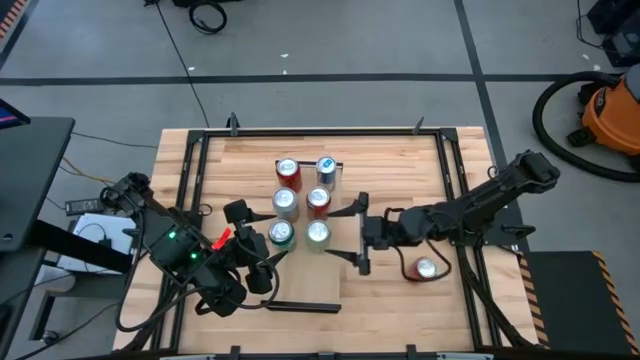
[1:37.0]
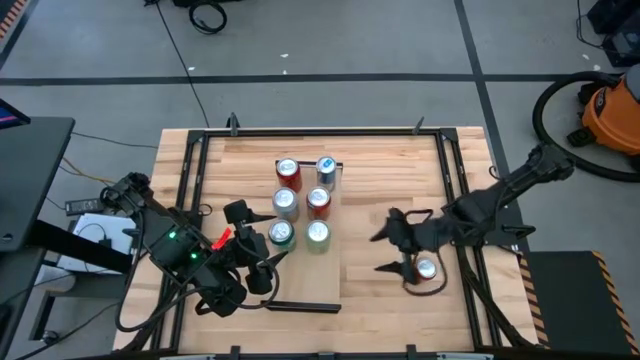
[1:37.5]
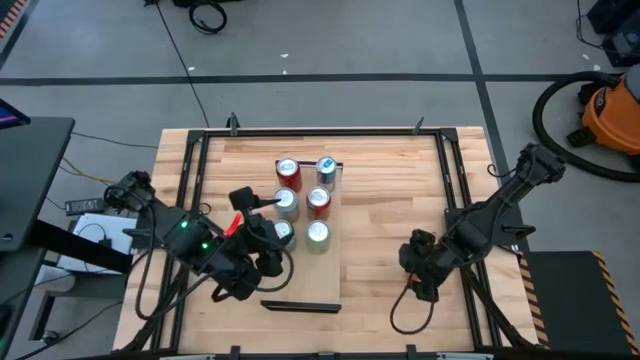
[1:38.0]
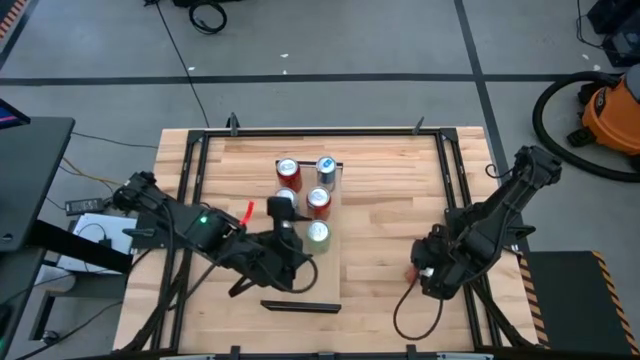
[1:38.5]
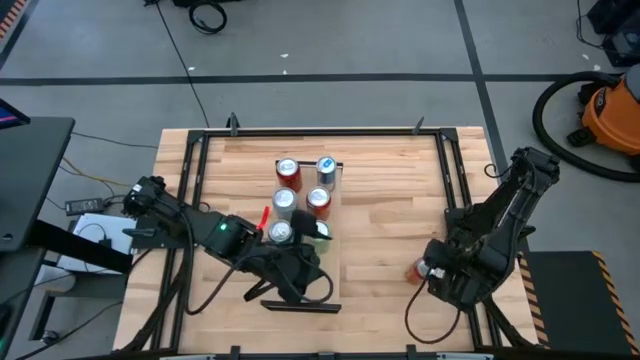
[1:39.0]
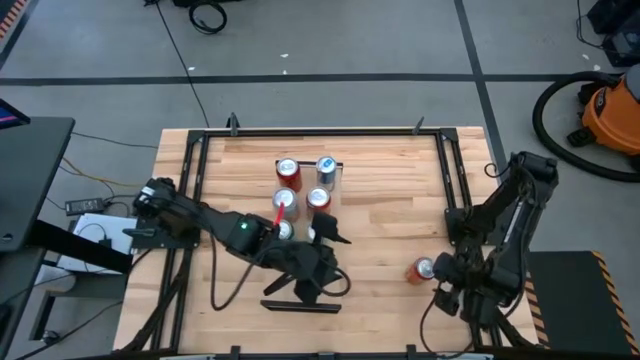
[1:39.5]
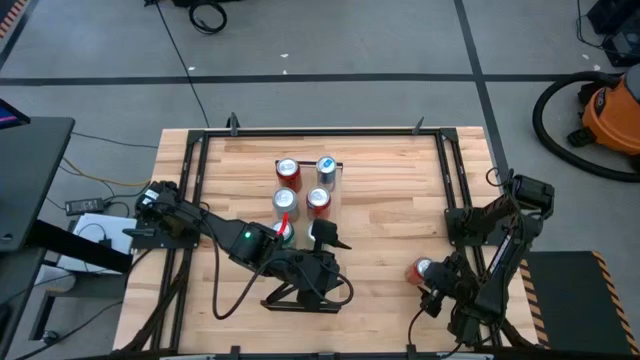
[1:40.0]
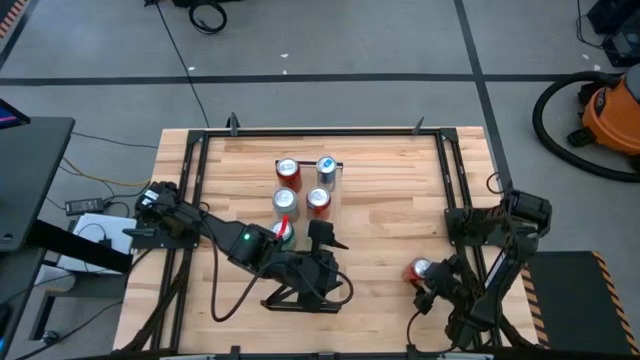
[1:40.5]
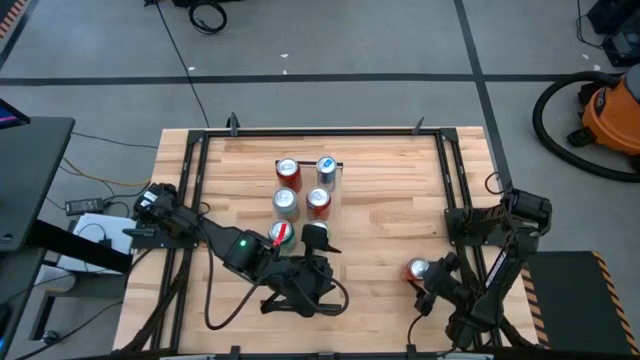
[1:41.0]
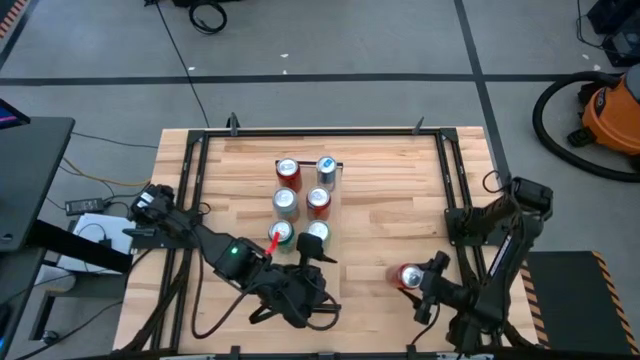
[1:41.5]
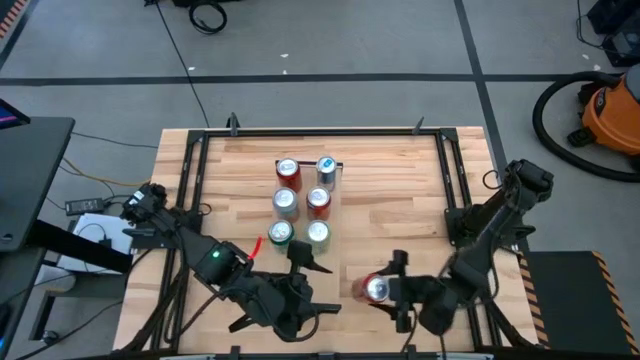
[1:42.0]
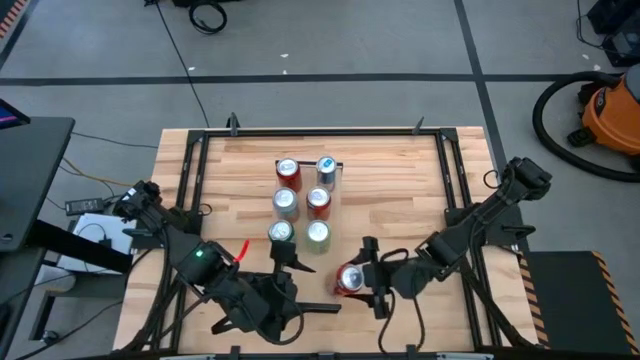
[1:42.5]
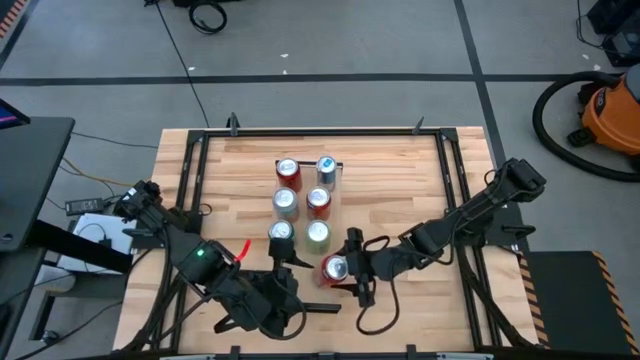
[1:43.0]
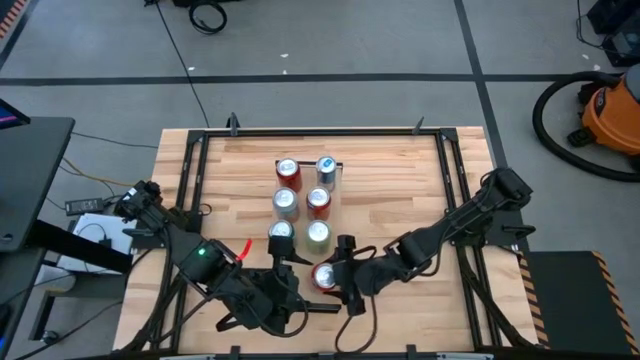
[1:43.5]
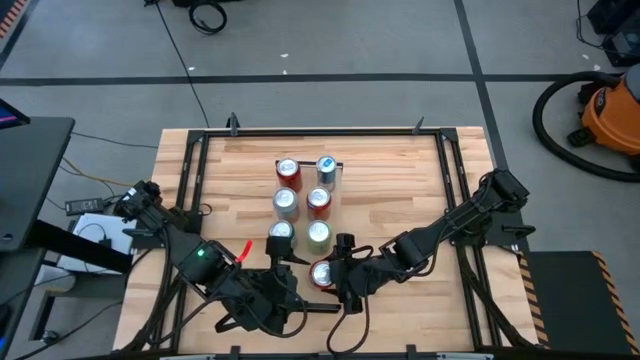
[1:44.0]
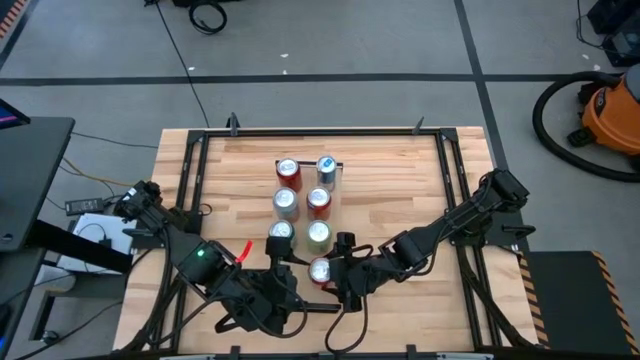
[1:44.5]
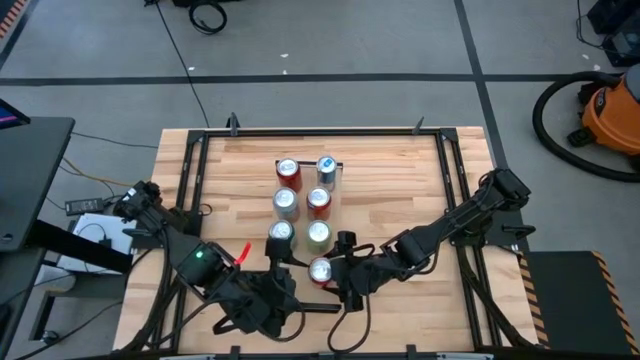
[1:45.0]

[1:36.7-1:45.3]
Task: Place canned beverage on shelf
Put the orange soda can on the shelf

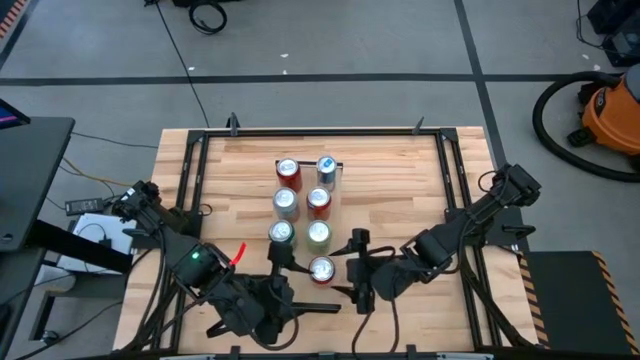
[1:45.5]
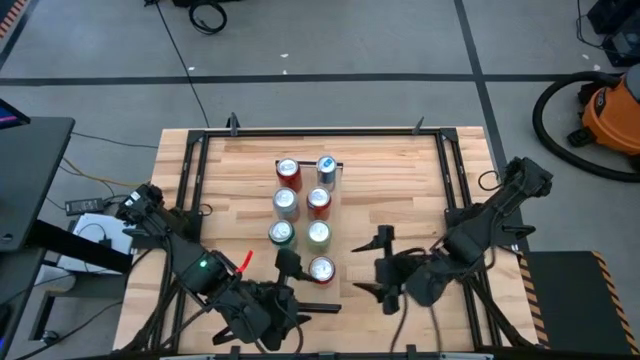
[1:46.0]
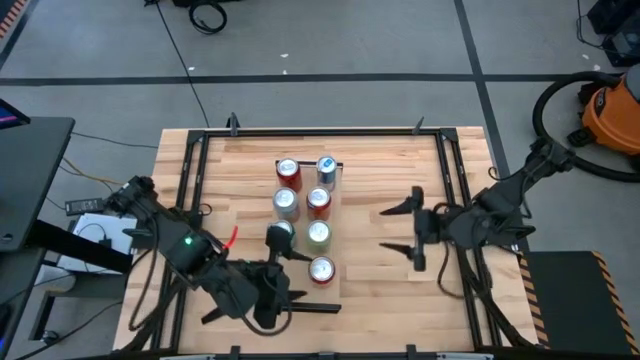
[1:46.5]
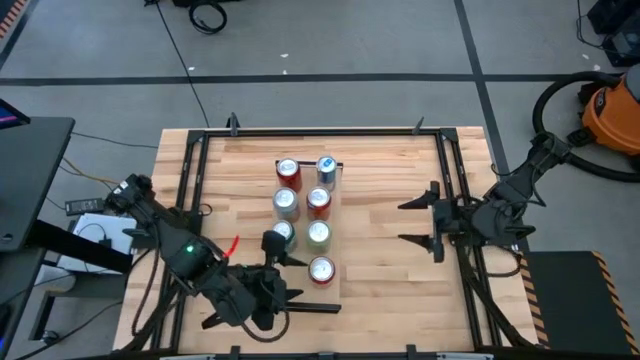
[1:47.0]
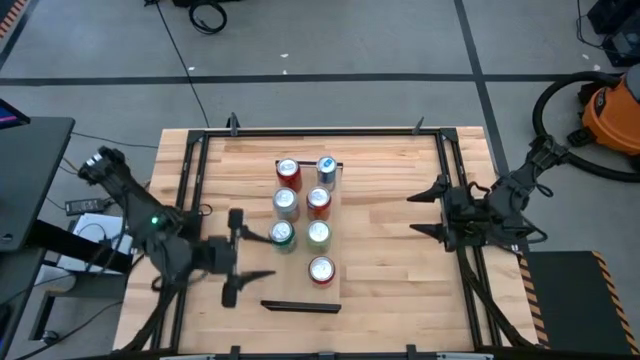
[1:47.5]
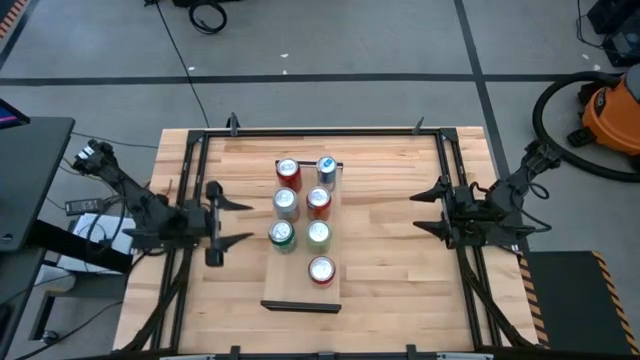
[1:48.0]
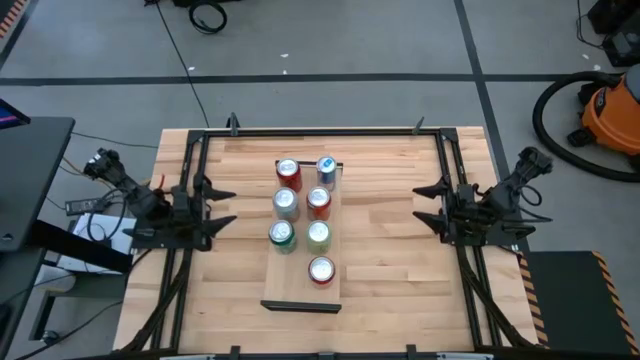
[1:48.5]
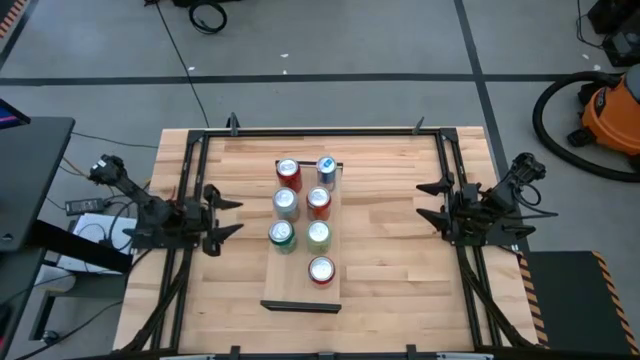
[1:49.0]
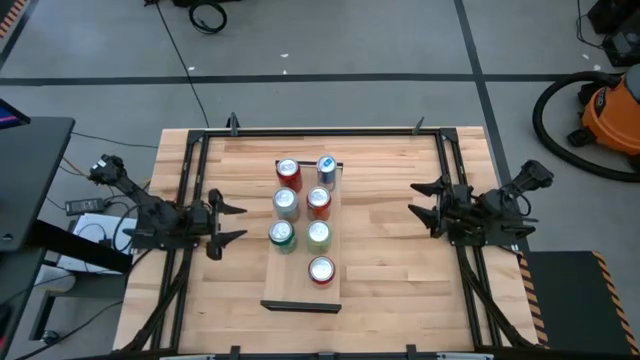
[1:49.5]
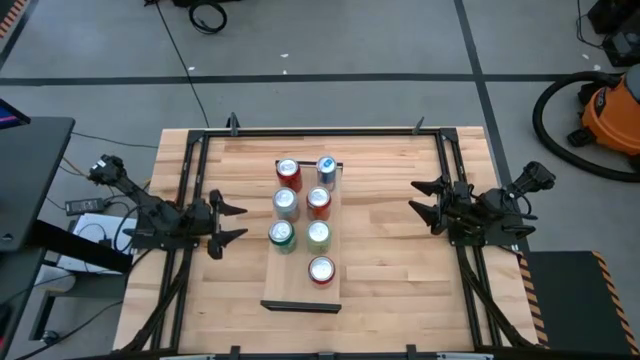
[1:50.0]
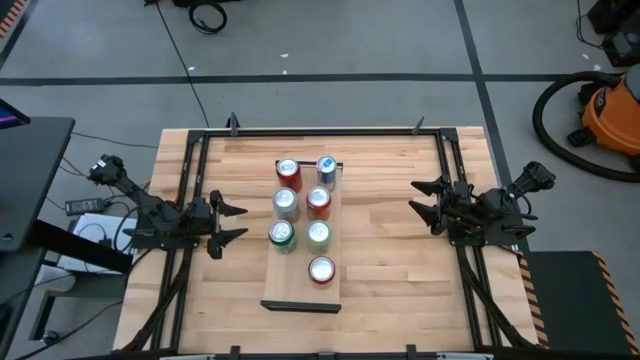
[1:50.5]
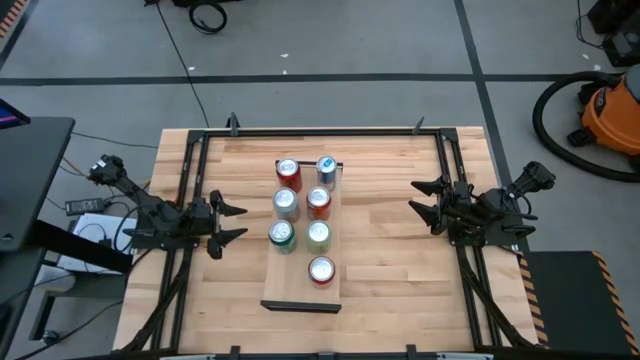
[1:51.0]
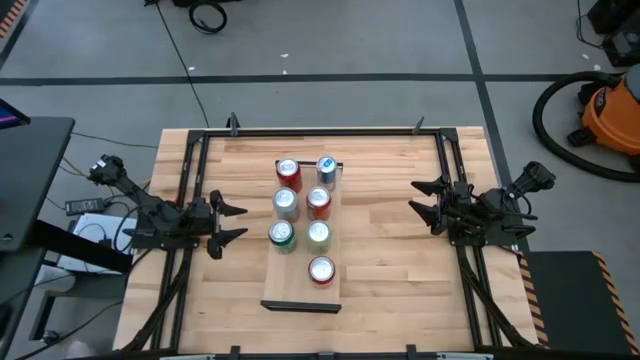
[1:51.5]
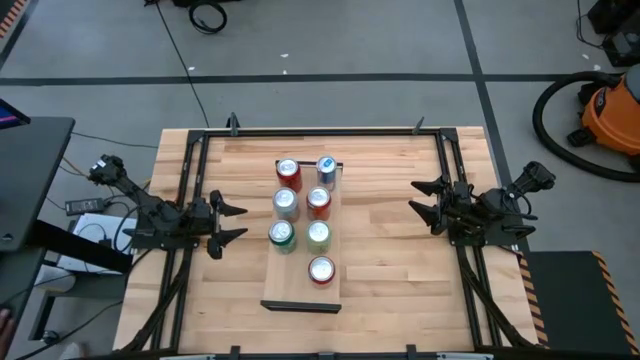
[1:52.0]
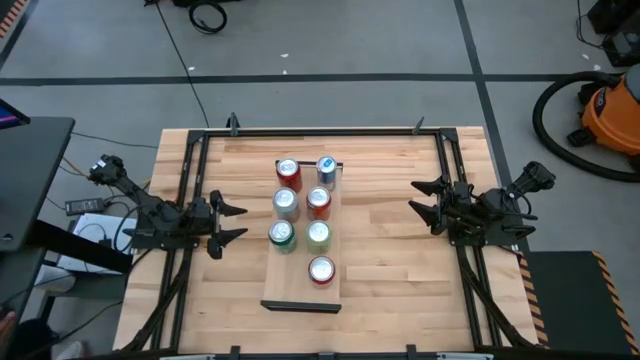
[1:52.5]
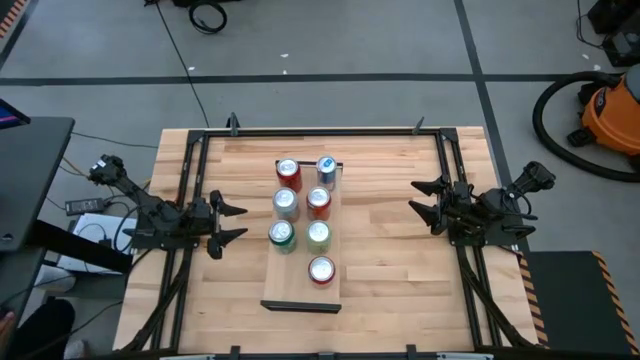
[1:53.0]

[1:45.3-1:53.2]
Return to Home Position

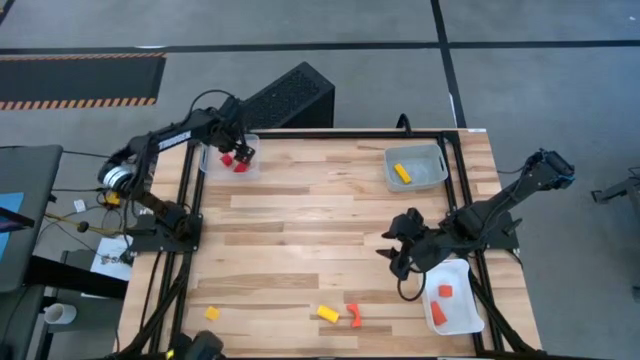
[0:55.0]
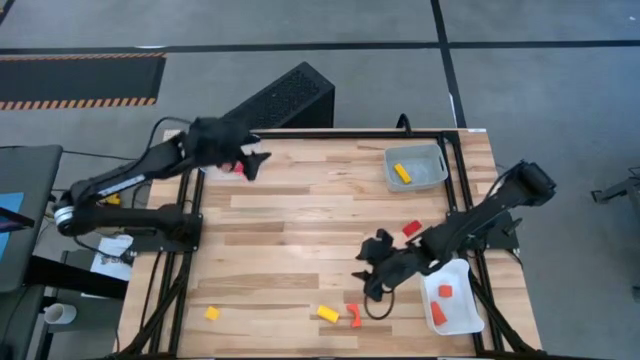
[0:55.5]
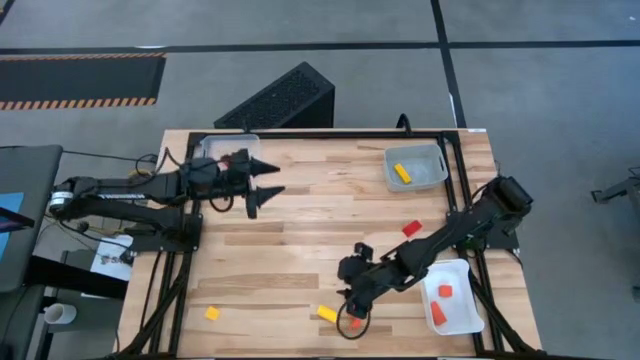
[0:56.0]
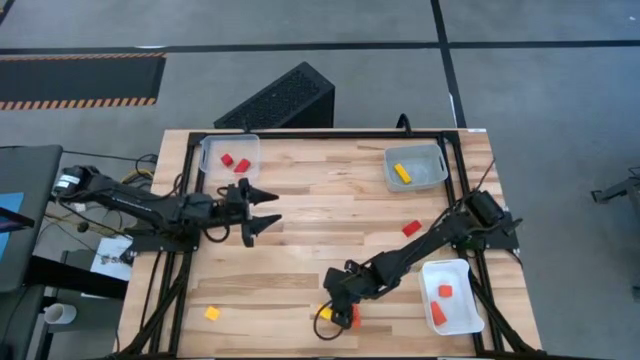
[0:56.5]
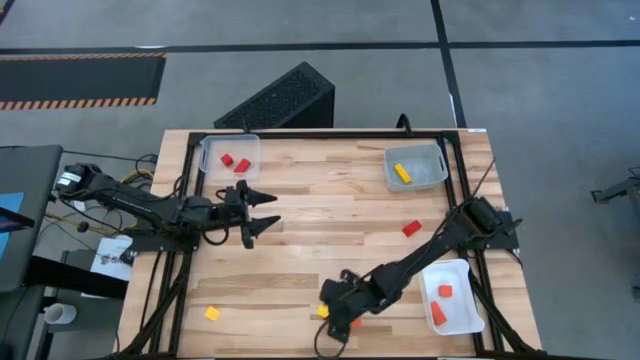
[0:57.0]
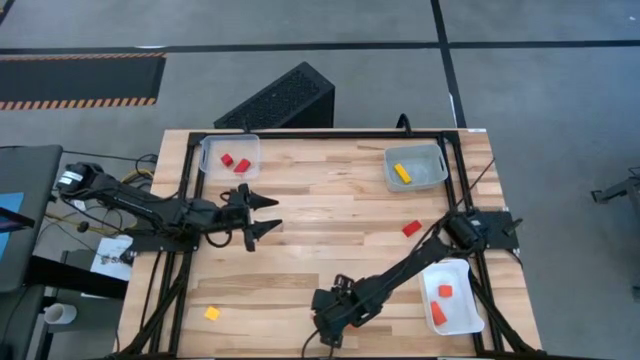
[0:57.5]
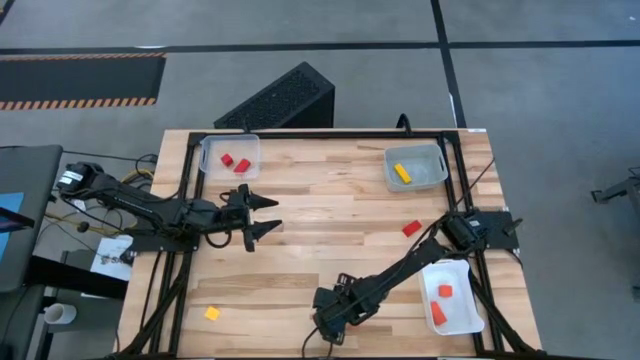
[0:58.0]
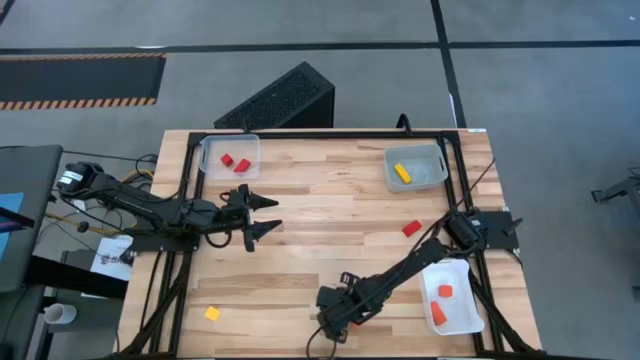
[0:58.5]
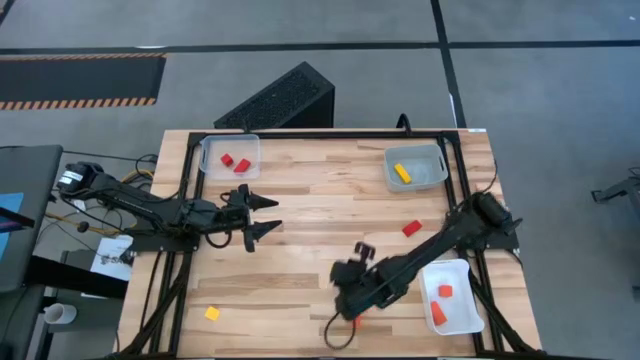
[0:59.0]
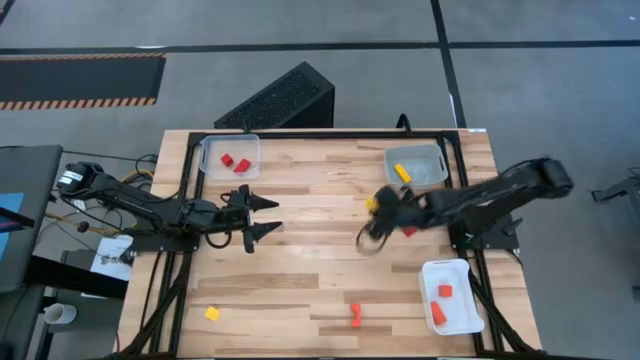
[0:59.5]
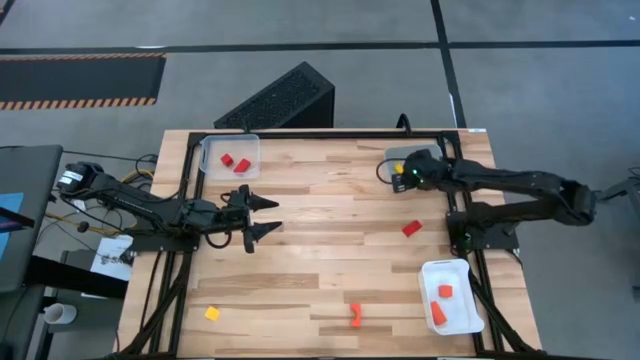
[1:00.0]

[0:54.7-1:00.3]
Task: Sort & place blocks by color
Put the right yellow block into the gray bin
